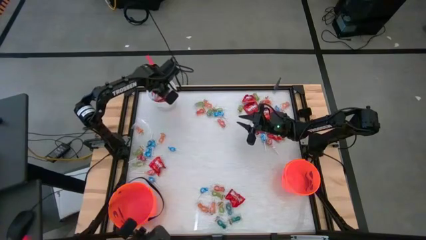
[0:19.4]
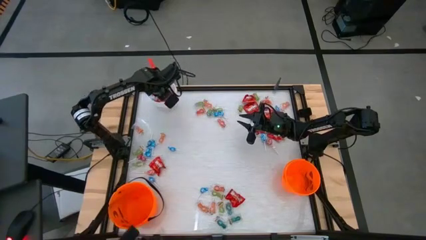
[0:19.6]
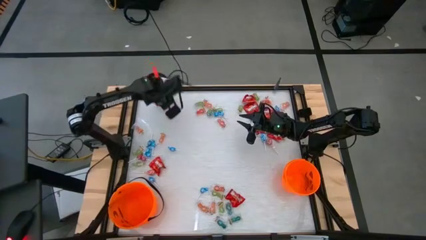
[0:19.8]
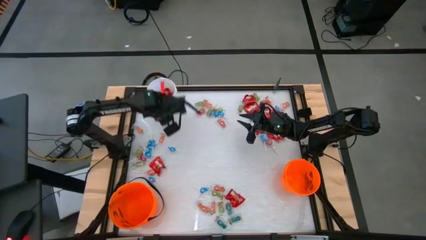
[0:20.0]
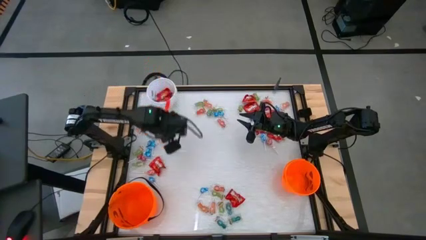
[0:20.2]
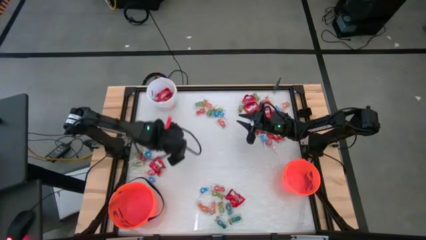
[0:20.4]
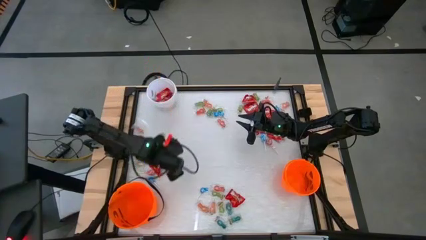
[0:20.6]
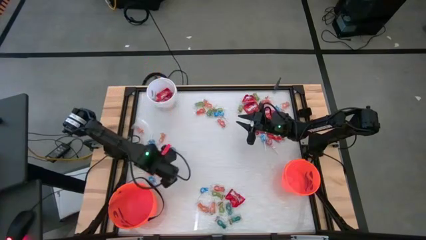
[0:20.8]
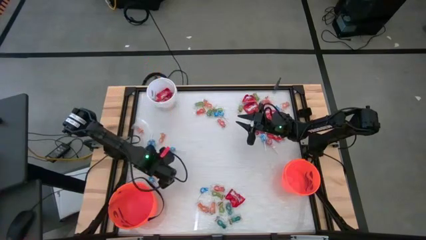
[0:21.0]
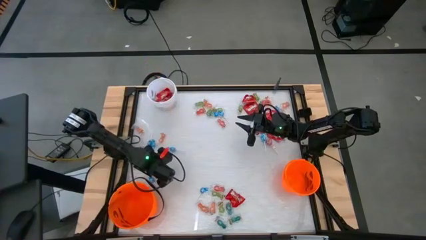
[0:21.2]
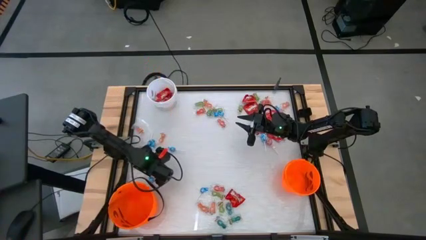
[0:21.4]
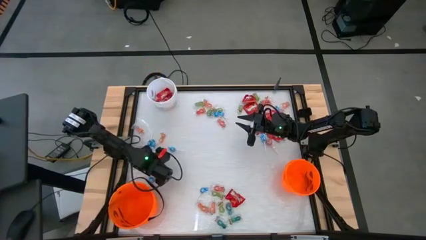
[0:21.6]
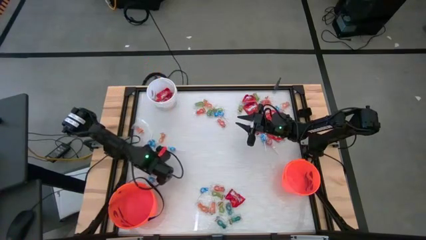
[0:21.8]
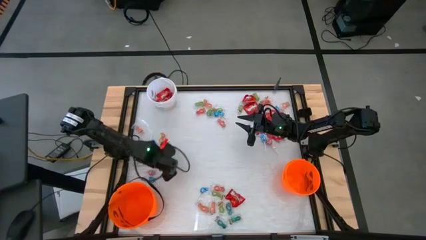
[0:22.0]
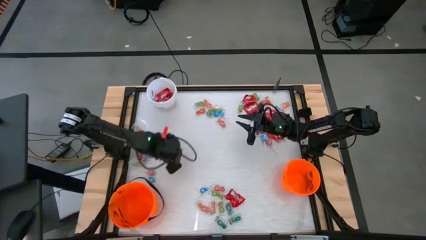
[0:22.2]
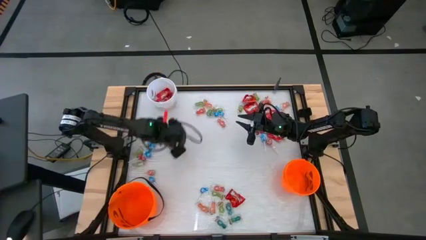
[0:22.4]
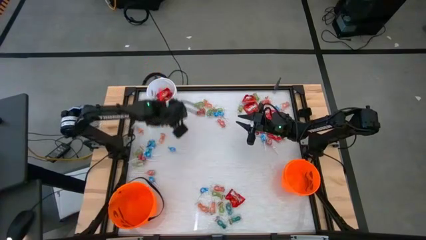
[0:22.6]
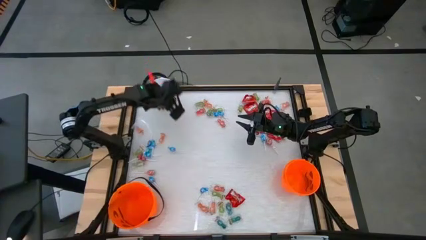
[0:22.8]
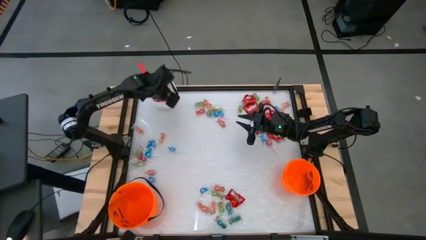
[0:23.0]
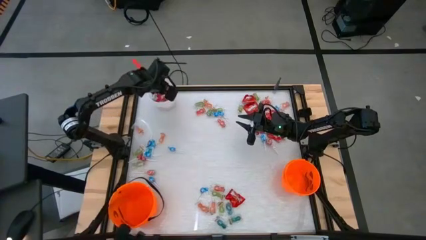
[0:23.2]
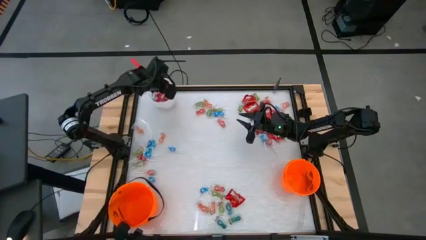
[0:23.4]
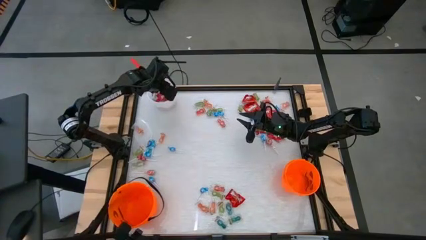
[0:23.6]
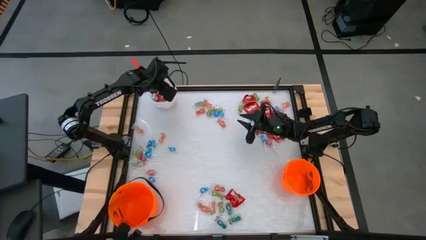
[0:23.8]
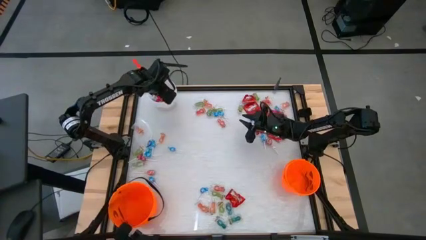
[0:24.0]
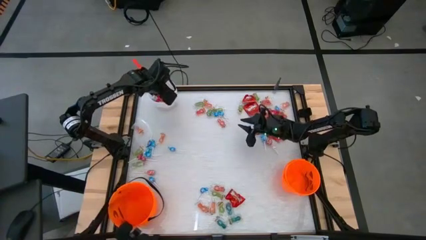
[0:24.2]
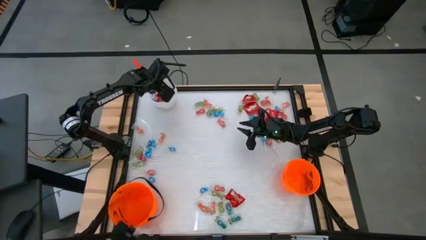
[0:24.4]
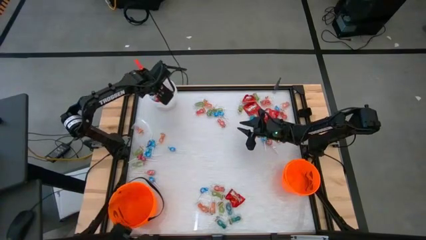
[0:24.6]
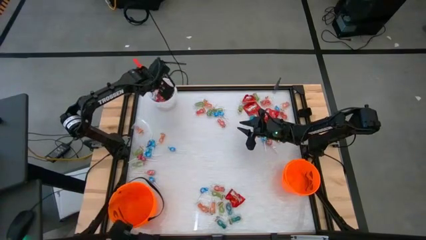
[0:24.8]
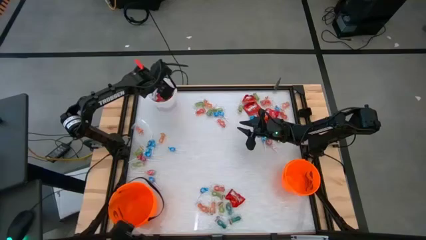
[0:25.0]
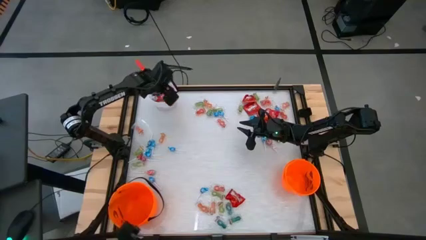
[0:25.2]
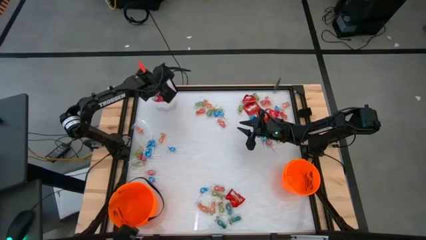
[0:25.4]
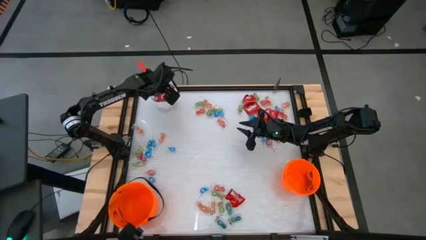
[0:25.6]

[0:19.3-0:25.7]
Task: Sort candy by brand, put in halloween buckets
Put the skittles into the white bucket

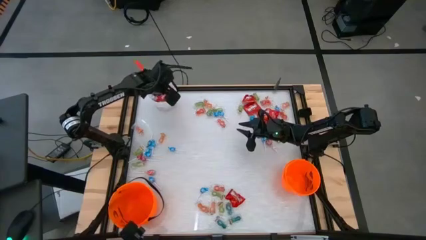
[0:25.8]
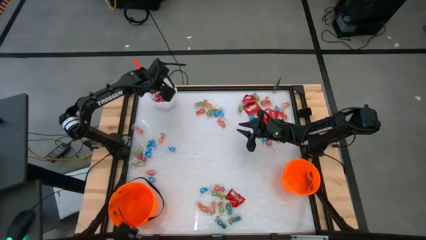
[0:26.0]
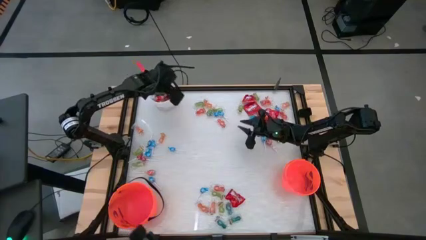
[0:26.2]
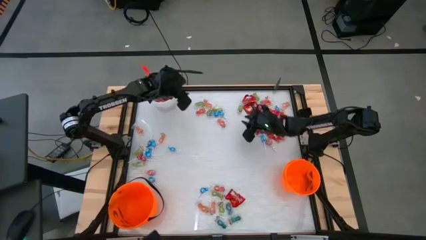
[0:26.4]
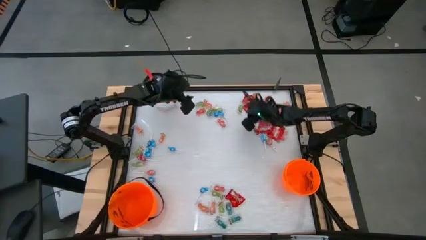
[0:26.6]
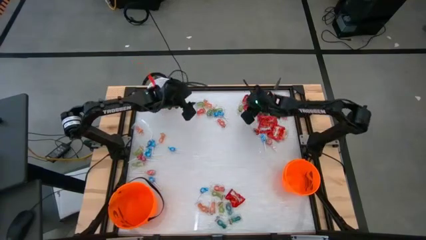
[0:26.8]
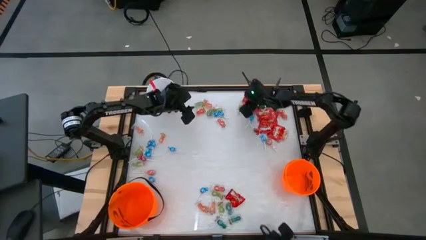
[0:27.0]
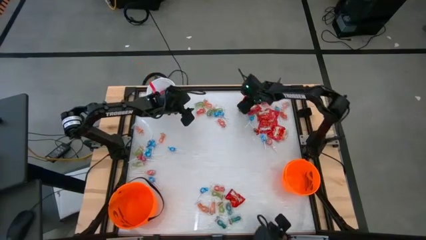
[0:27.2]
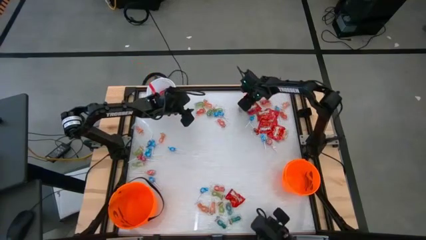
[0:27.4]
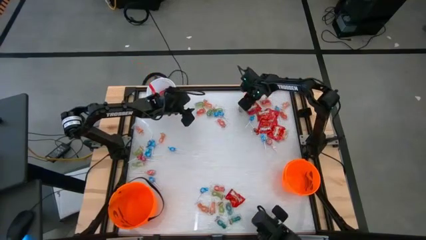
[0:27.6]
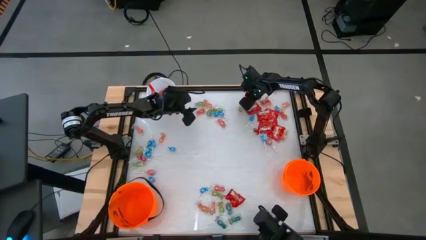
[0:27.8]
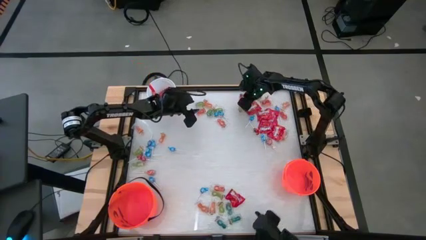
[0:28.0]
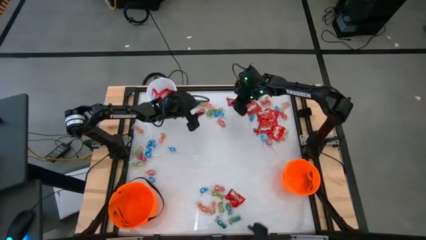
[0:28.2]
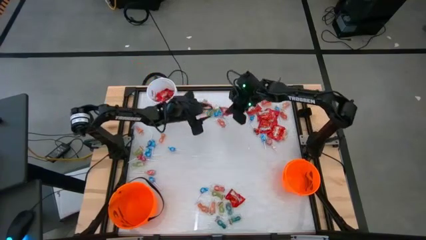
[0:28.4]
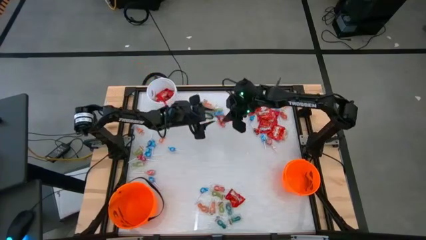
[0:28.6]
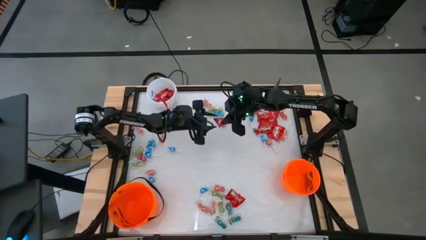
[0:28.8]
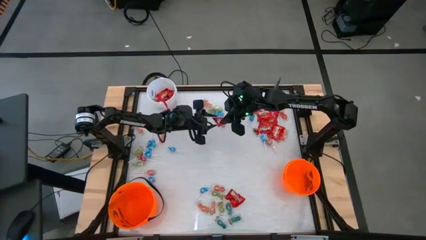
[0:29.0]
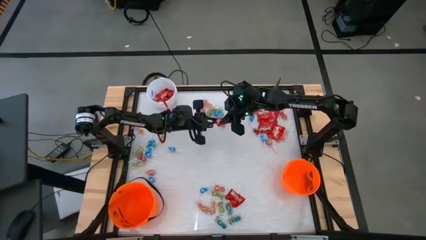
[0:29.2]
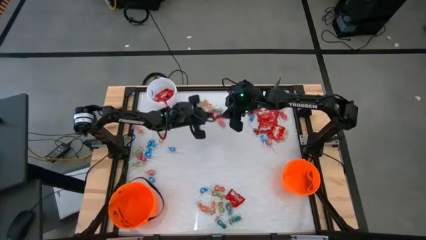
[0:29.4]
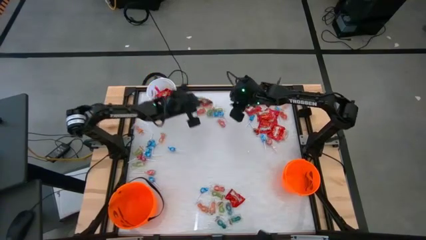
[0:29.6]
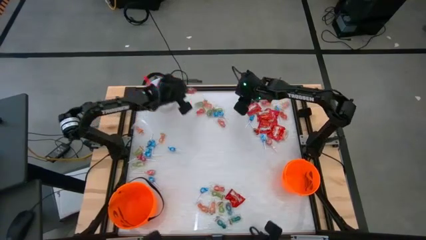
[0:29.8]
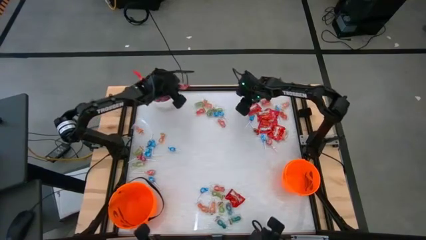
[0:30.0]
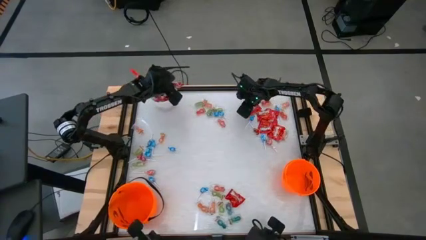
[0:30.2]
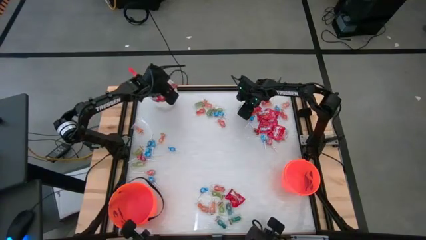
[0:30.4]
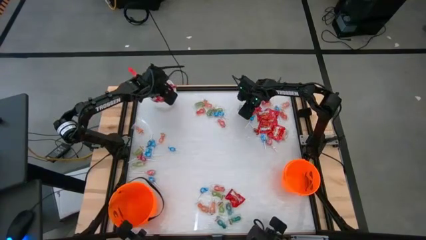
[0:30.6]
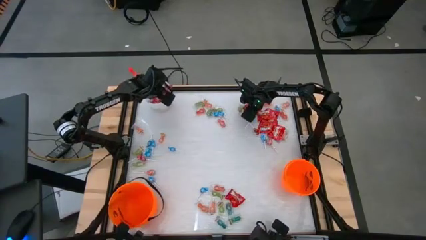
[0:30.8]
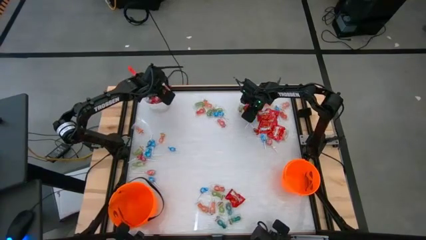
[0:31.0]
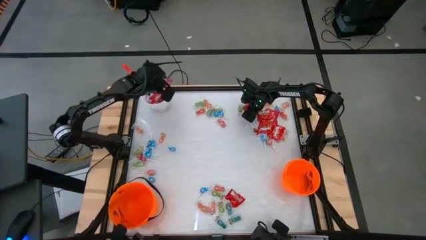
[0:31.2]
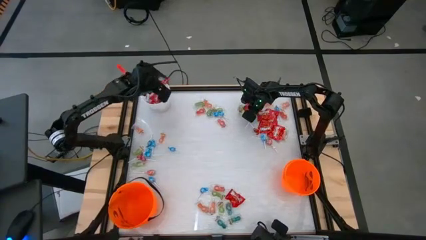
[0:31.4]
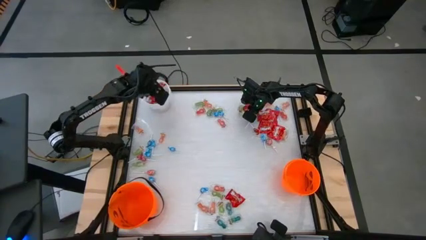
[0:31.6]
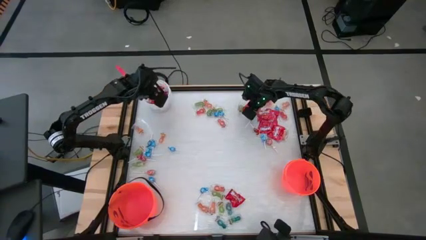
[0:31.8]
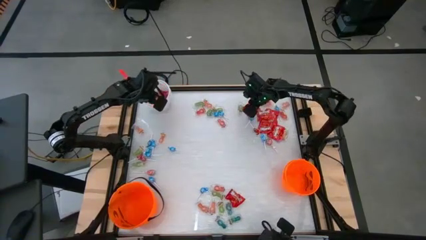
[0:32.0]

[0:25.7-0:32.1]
Put the skittles into the white bucket

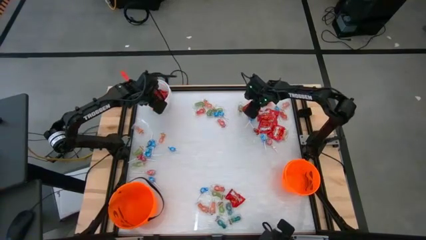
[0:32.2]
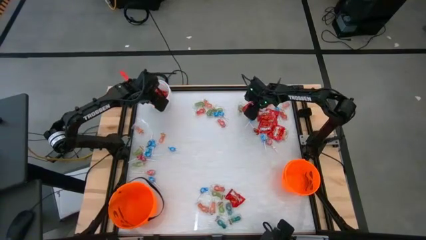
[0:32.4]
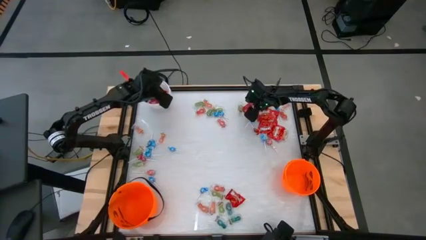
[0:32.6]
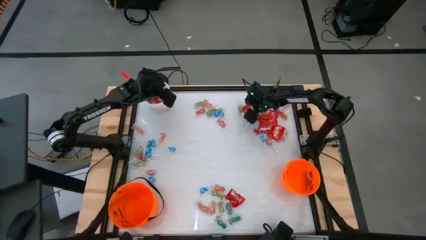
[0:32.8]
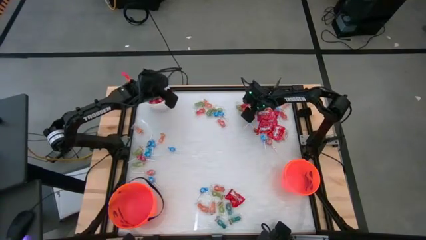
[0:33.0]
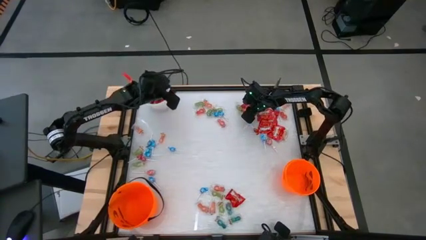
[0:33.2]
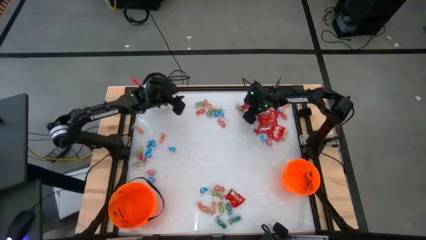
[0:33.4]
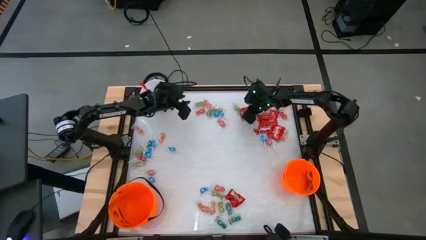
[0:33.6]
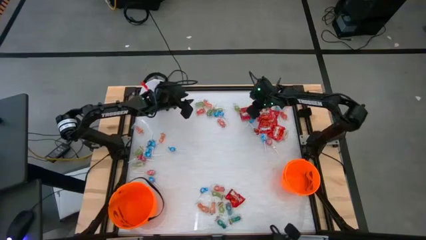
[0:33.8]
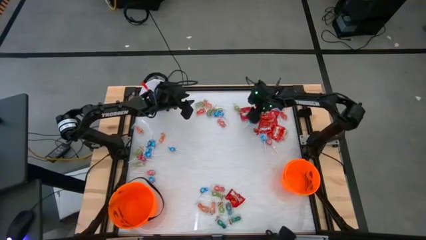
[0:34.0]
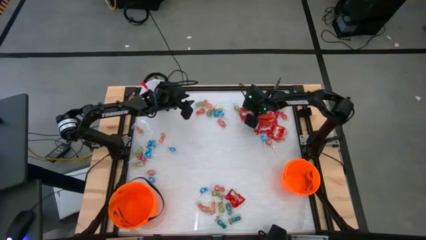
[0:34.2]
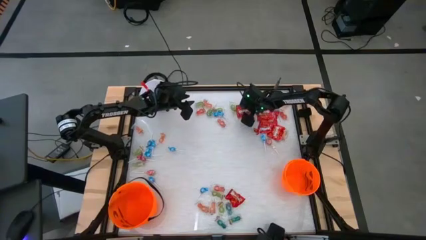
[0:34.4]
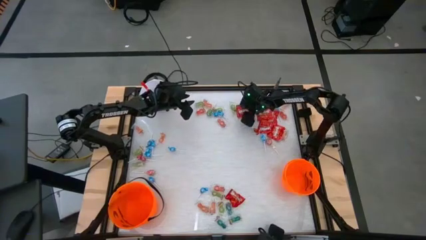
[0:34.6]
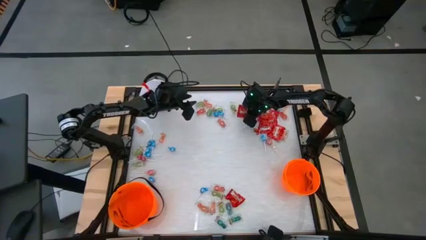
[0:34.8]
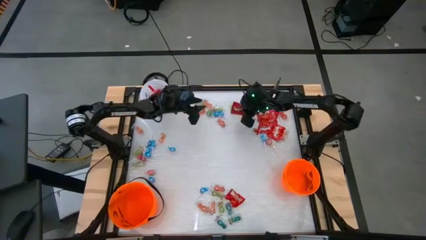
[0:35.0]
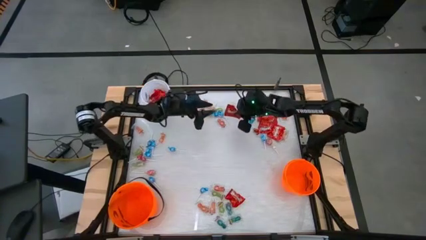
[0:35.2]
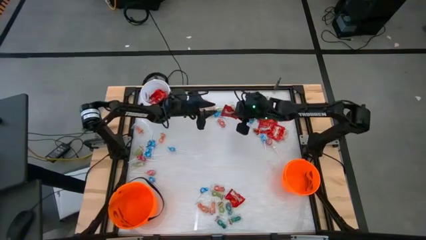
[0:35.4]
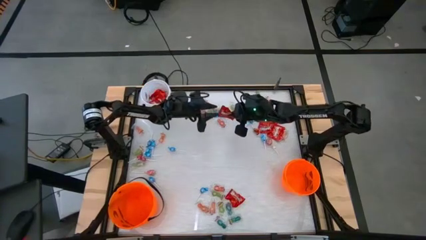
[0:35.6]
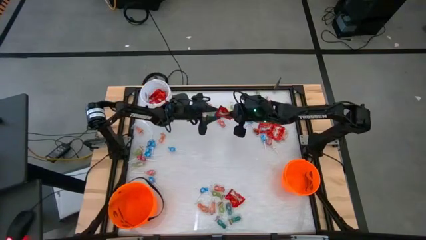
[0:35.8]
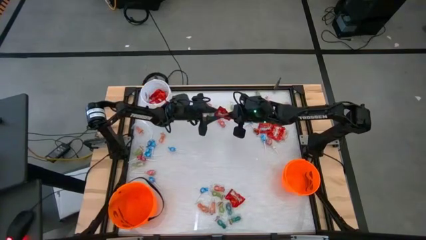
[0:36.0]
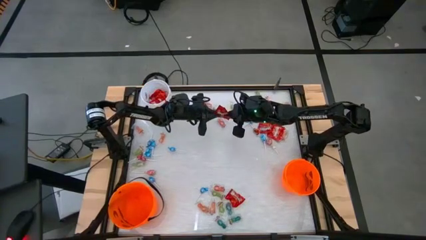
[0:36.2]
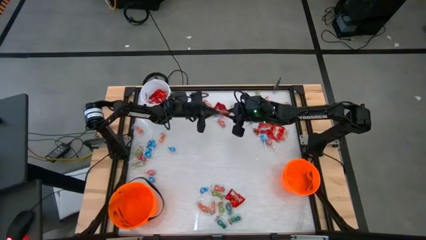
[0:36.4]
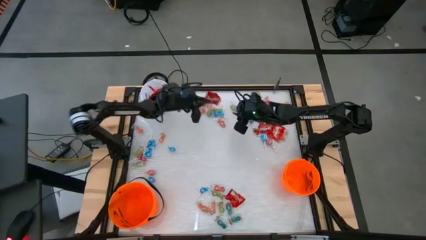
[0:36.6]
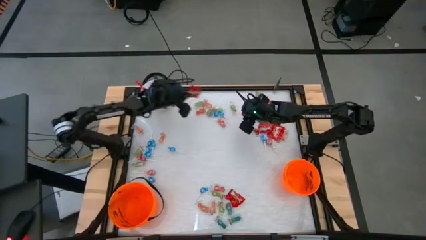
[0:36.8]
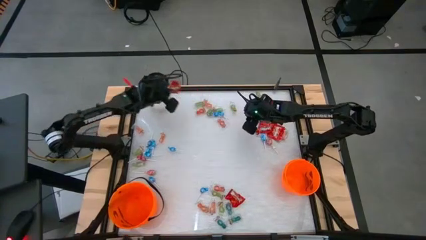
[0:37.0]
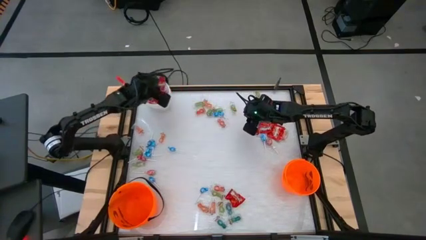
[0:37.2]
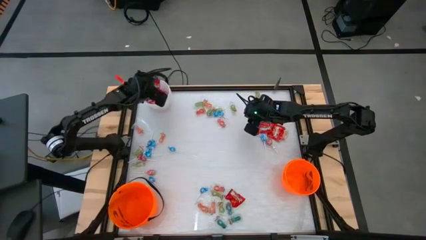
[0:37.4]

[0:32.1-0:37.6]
Put the skittles into the white bucket
